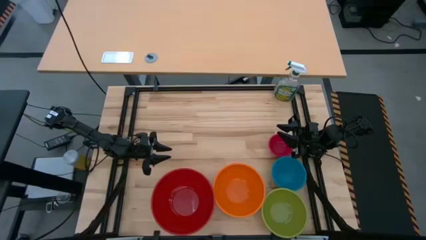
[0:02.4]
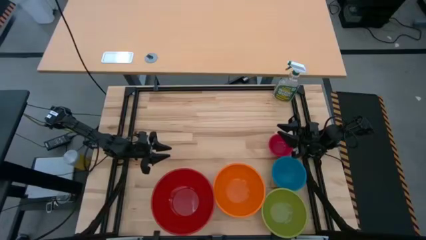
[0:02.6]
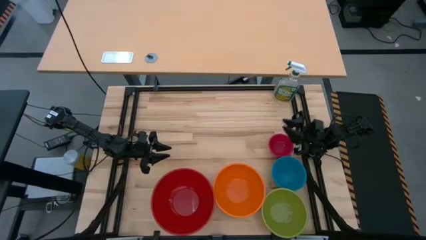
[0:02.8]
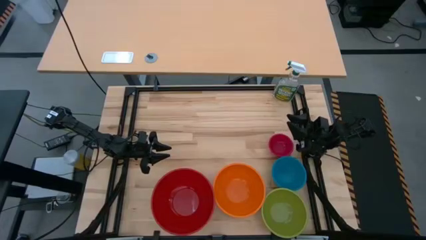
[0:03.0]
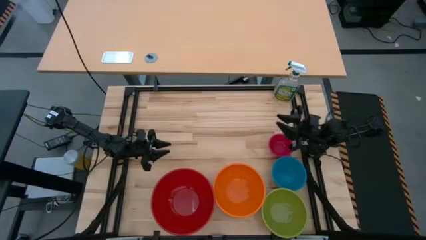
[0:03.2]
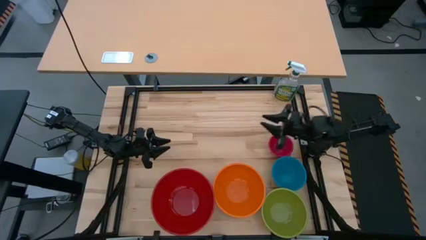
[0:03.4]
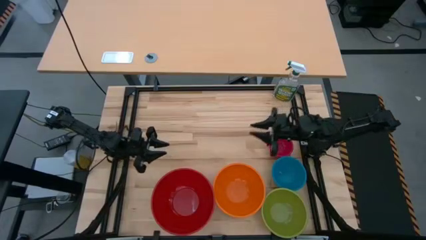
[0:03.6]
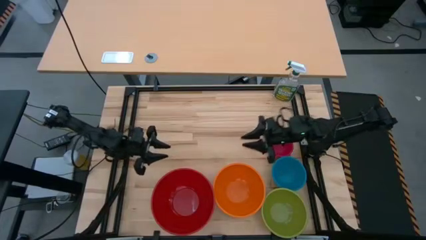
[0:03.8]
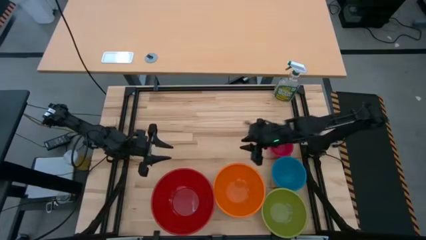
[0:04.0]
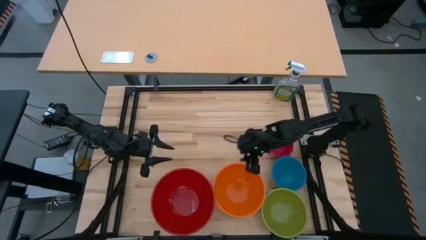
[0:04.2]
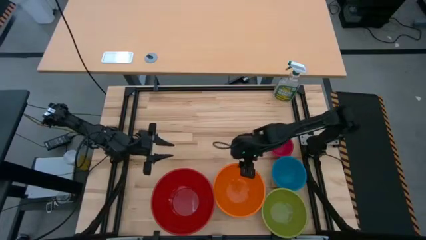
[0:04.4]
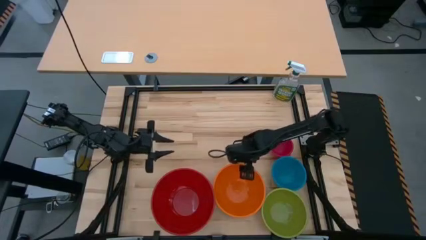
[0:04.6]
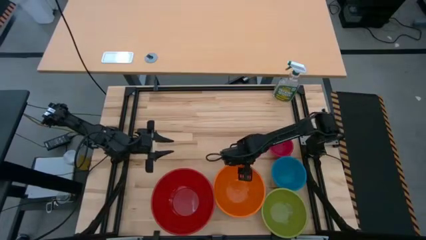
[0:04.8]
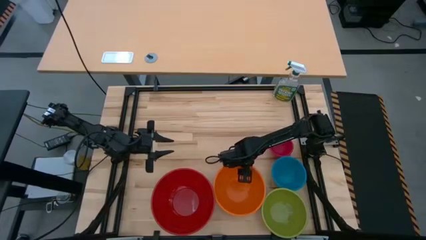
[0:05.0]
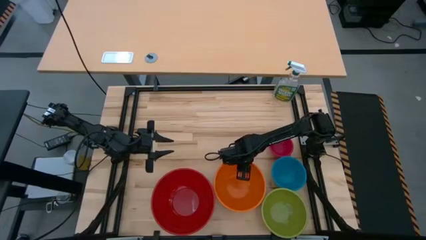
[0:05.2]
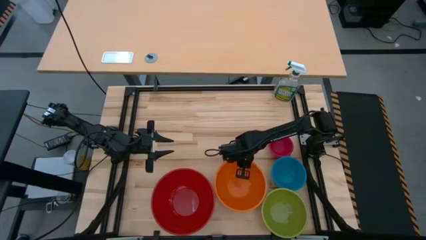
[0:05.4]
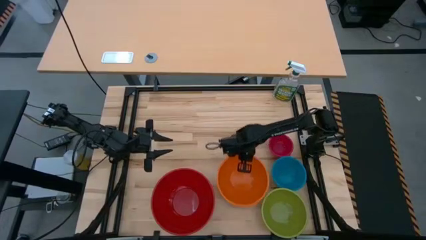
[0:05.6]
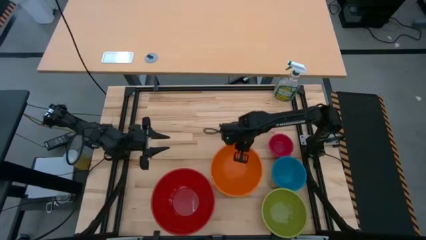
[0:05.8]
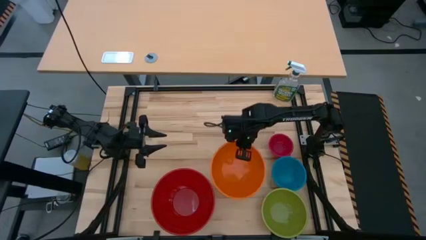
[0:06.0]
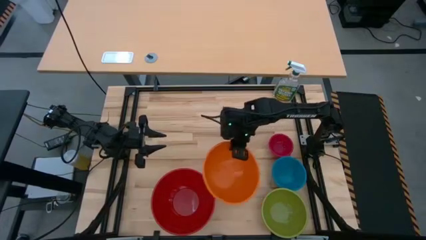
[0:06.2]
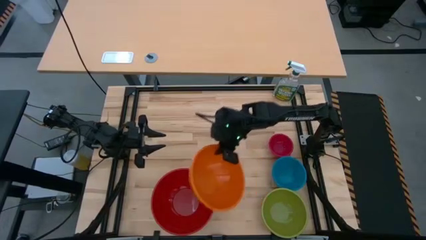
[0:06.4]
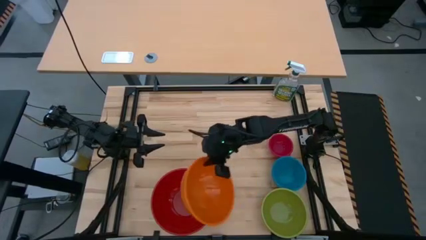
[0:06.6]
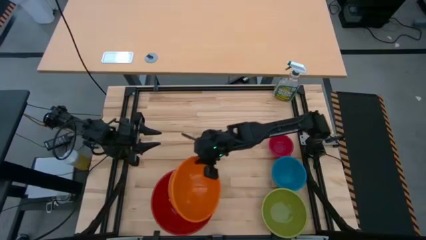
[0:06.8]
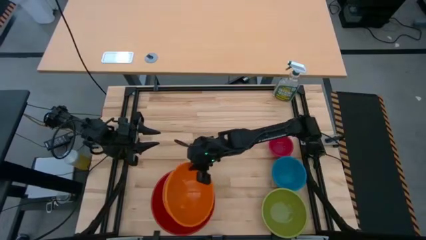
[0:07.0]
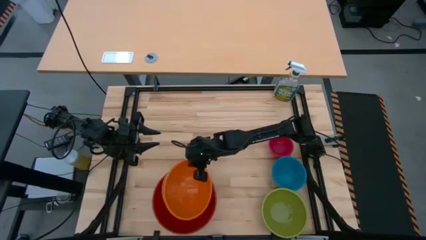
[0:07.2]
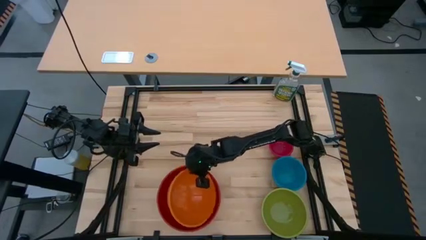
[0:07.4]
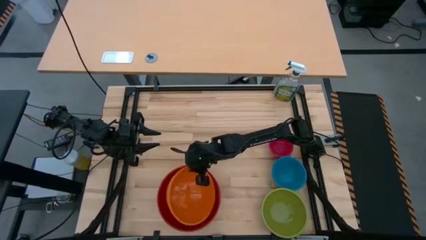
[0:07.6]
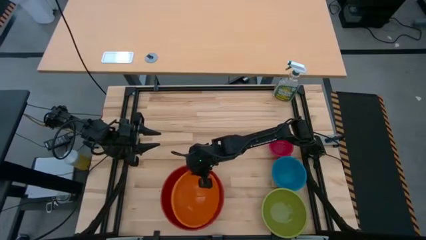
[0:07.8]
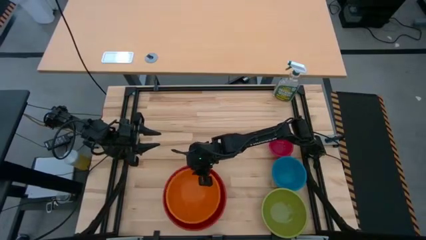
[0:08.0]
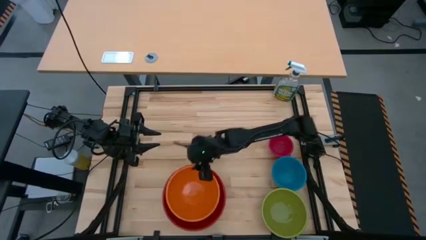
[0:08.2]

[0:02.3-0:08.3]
Stack the orange bowl on the red bowl

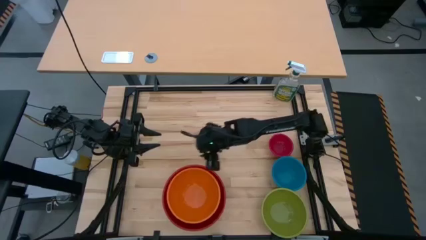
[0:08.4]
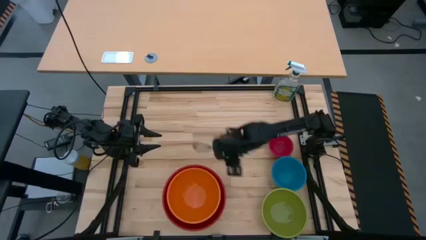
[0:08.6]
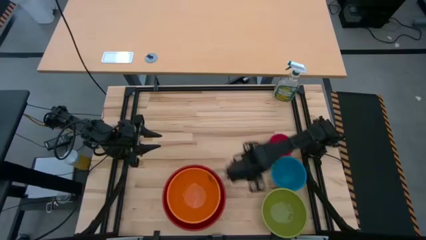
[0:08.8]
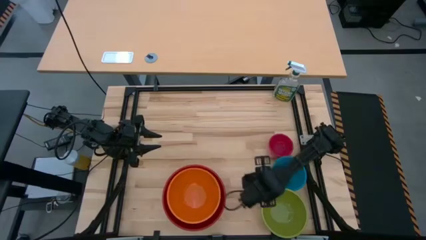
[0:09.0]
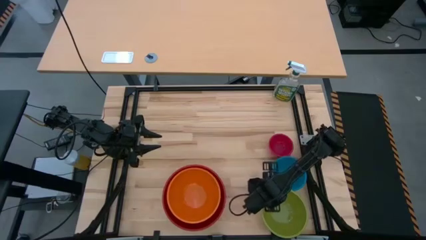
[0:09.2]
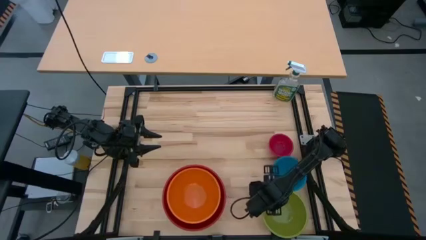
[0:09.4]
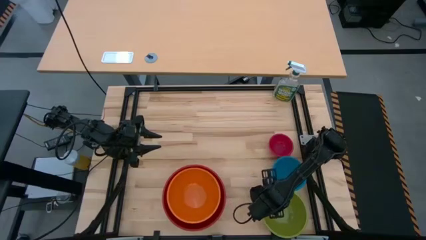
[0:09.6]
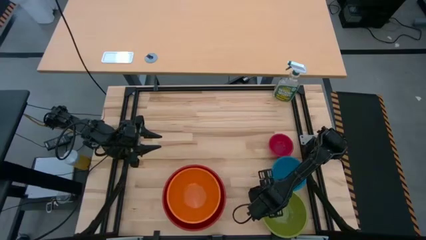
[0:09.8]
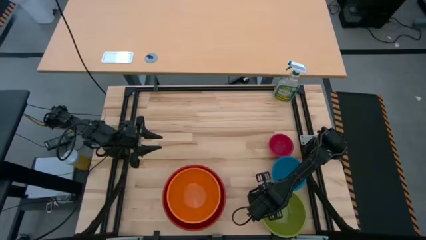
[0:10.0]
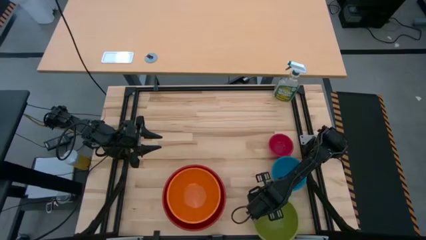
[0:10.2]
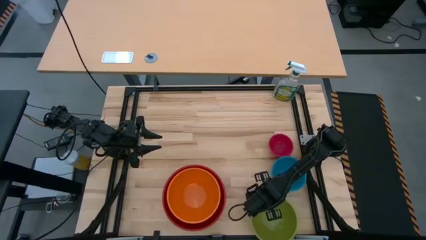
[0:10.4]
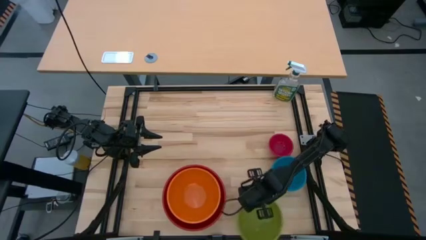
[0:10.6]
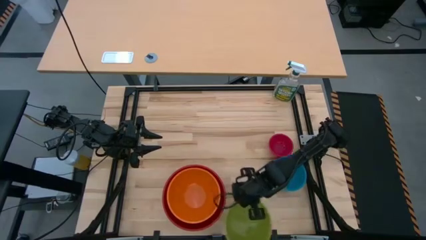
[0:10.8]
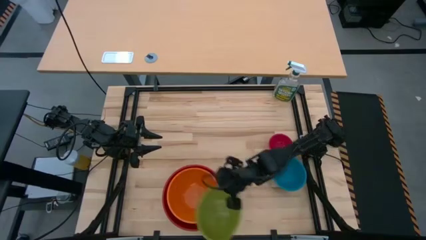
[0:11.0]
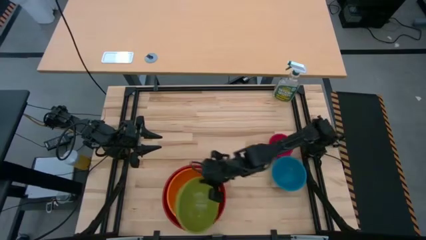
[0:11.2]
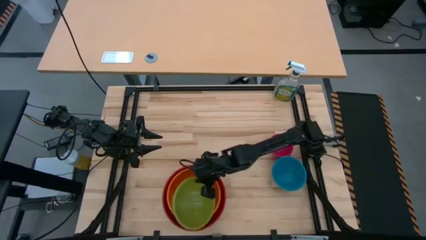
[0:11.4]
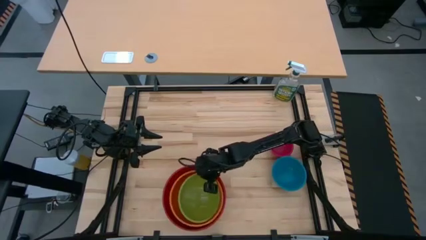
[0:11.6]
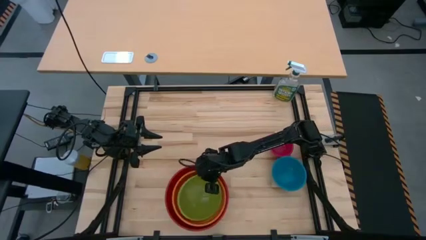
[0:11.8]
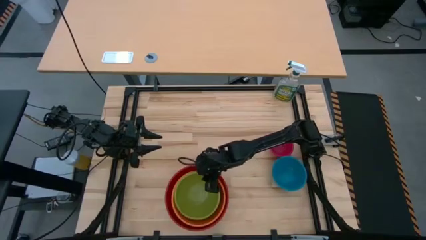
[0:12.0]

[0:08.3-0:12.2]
Stack the green bowl on the orange bowl

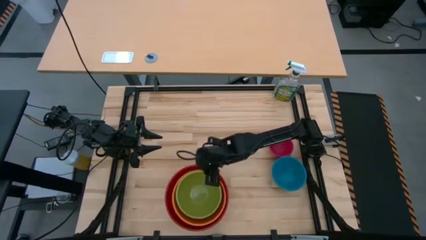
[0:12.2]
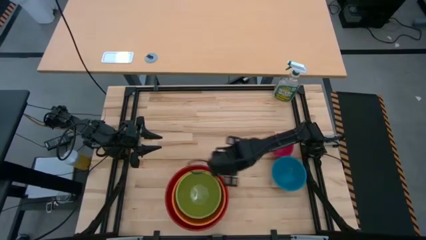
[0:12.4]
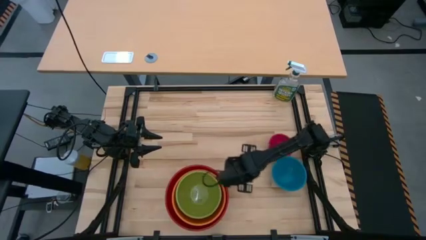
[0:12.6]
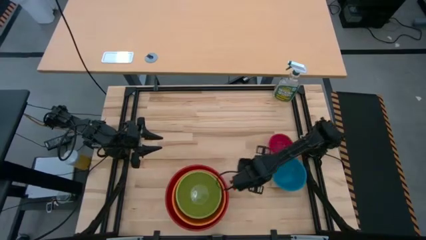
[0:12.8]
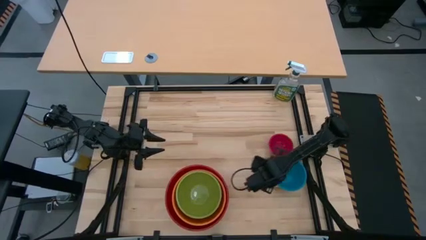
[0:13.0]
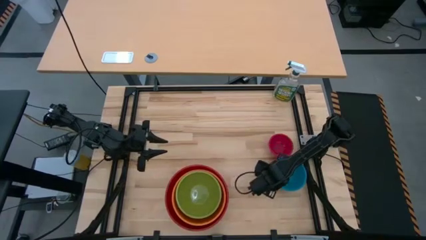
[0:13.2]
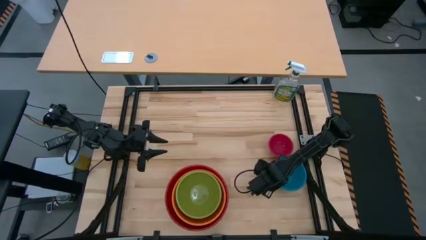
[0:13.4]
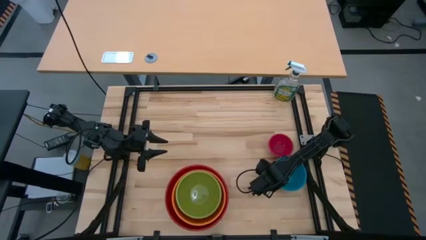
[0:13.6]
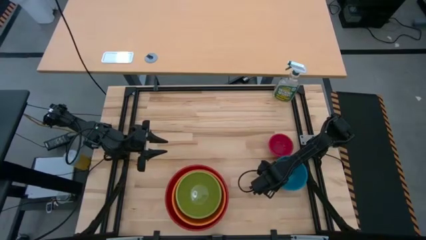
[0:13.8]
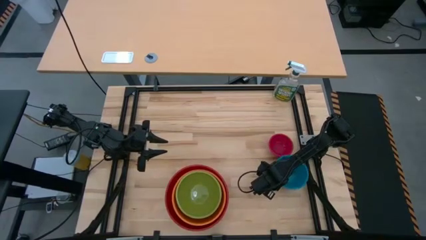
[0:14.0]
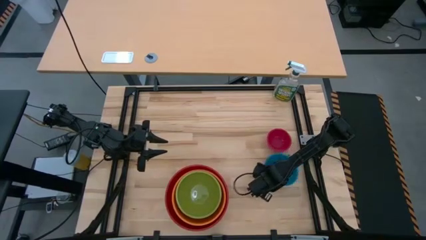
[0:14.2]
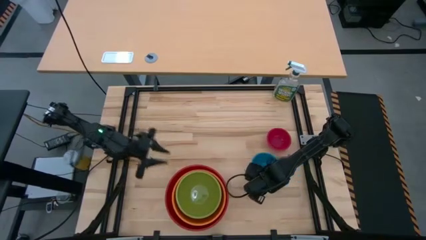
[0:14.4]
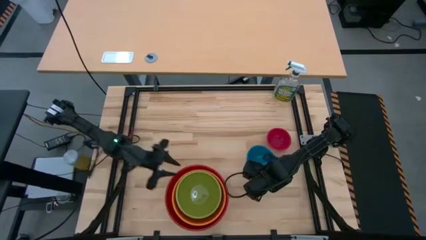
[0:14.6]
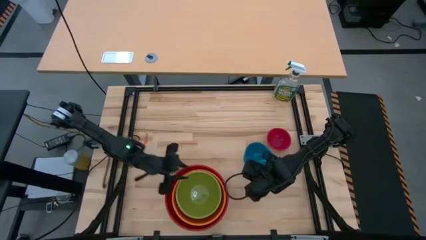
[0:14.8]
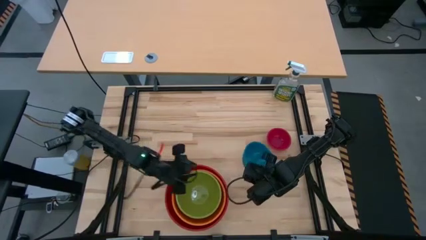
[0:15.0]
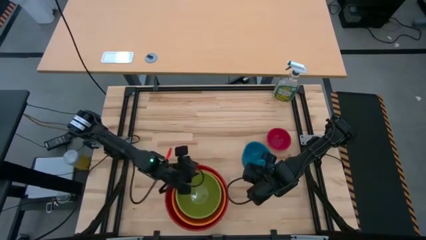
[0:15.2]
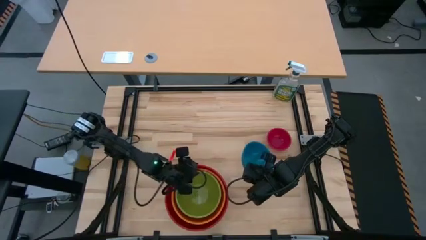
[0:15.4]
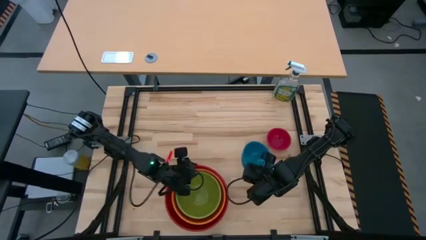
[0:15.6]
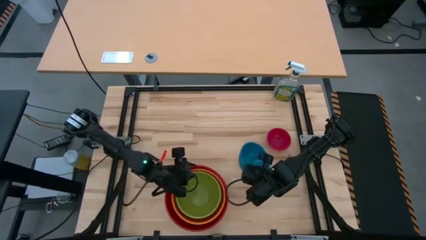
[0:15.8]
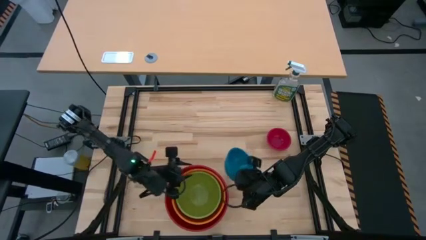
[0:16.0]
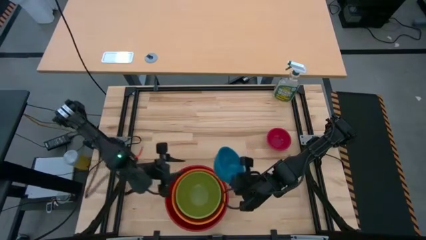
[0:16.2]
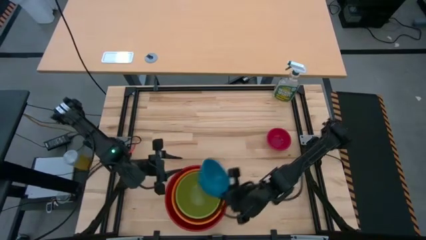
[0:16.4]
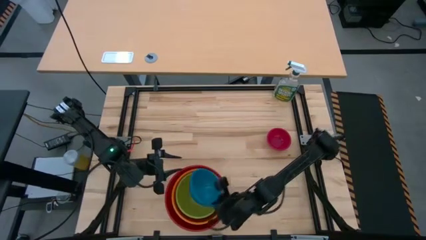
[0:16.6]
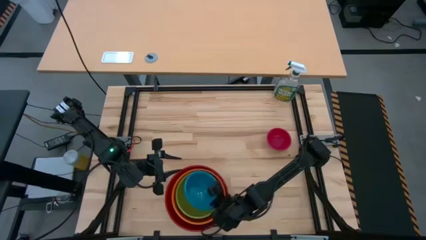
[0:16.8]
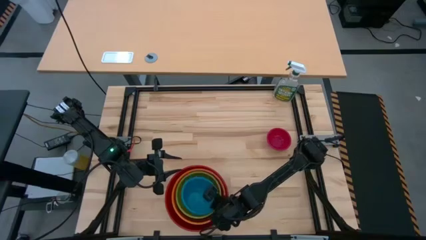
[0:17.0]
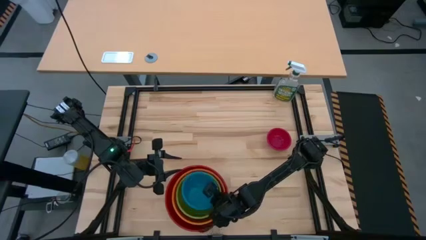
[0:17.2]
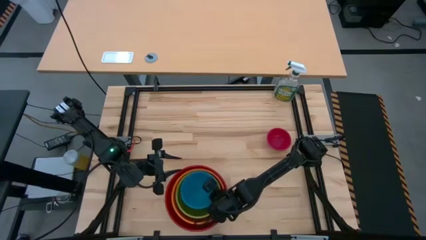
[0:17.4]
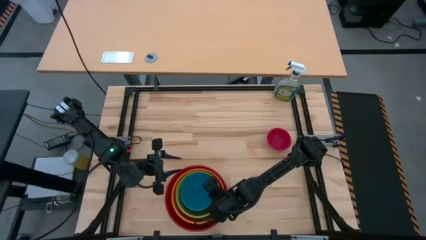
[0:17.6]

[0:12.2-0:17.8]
Stack the blue bowl on the green bowl

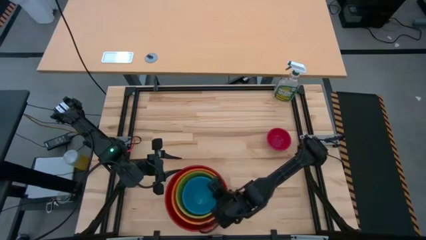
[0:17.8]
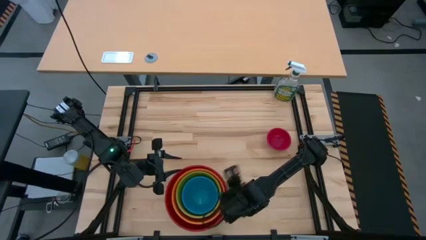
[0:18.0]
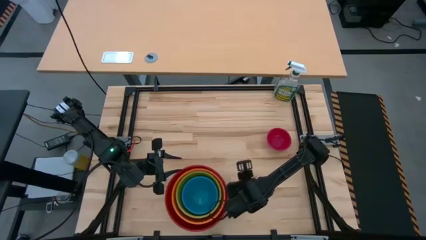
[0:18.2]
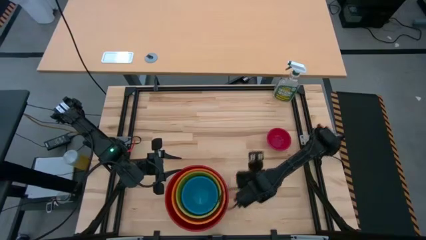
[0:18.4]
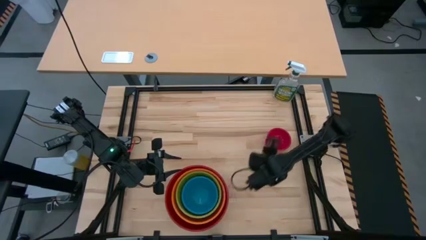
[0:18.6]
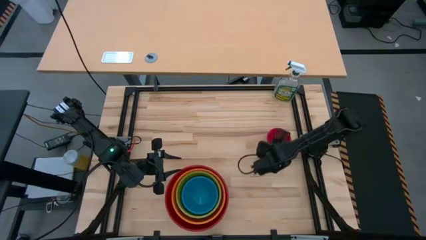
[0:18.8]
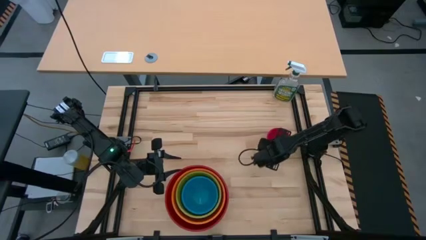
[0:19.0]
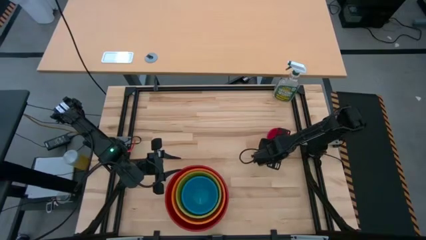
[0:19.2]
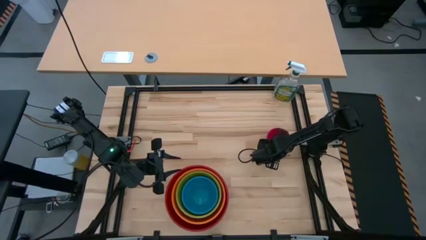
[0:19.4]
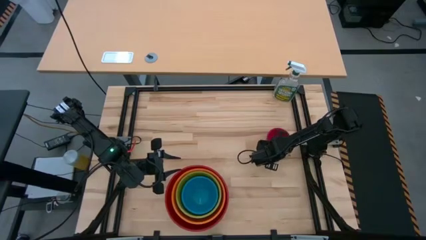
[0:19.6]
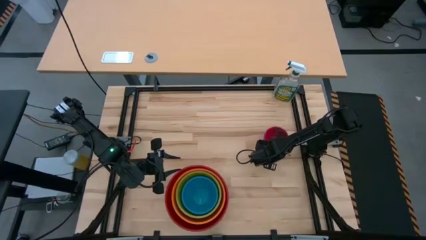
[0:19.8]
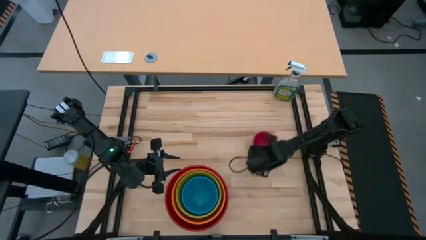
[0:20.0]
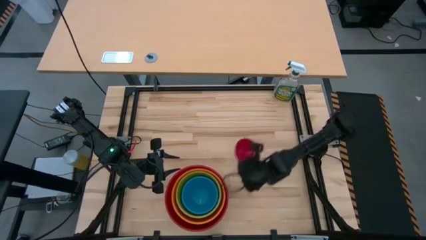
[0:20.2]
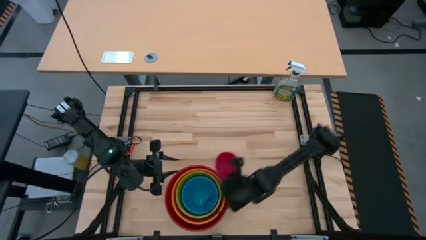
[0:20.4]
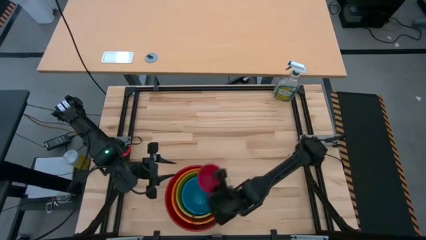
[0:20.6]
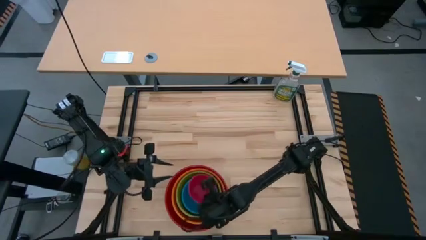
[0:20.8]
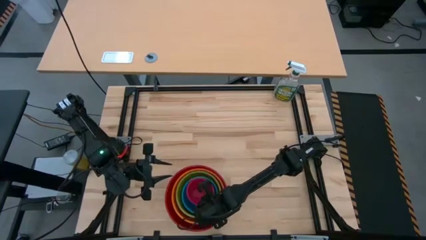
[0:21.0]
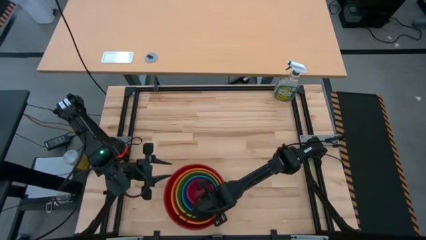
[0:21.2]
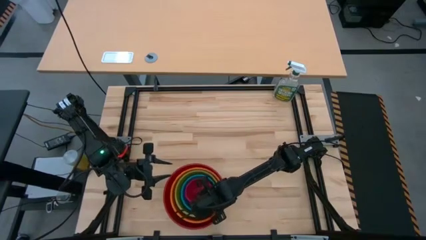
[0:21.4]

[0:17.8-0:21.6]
Stack the pink bowl on the blue bowl
